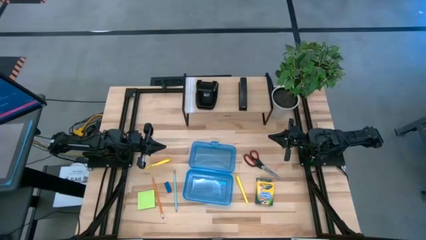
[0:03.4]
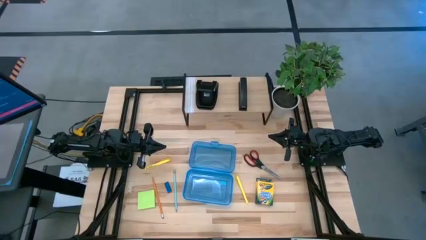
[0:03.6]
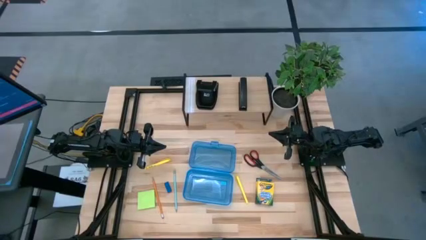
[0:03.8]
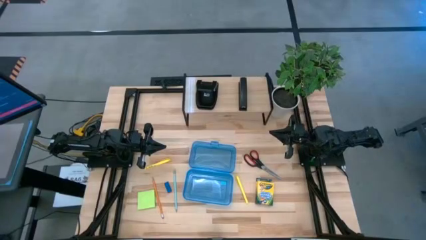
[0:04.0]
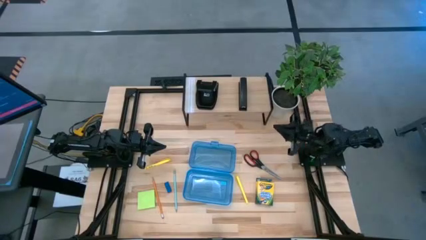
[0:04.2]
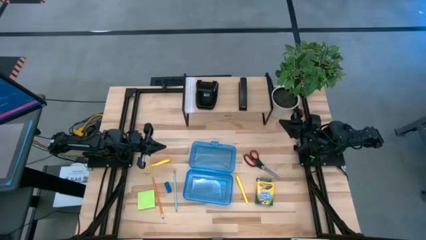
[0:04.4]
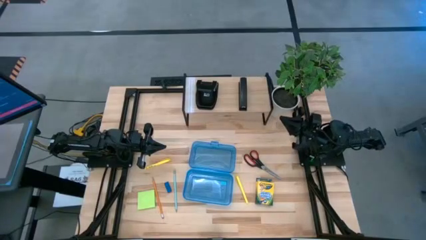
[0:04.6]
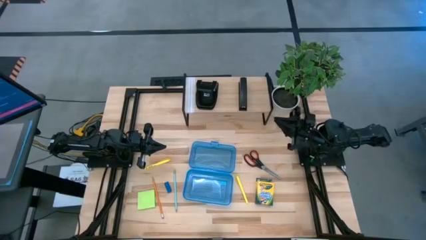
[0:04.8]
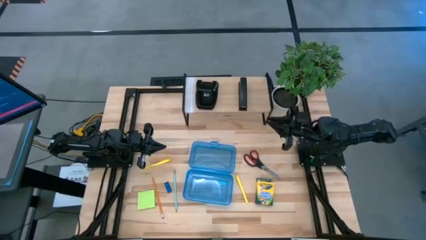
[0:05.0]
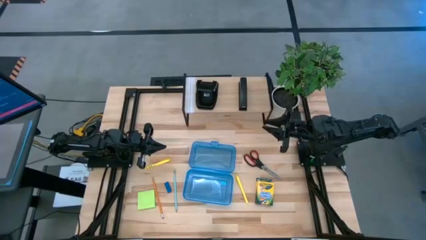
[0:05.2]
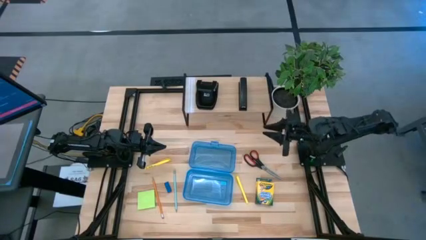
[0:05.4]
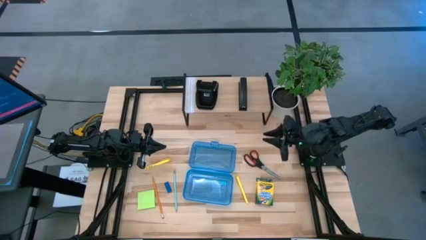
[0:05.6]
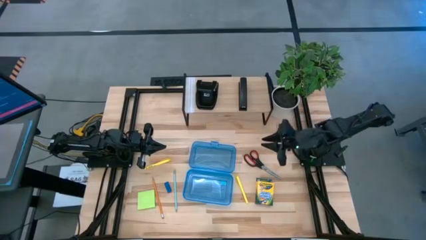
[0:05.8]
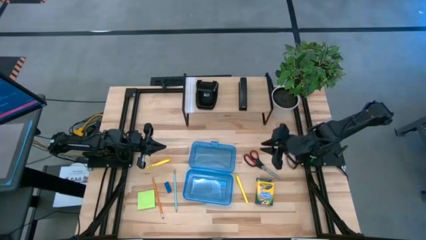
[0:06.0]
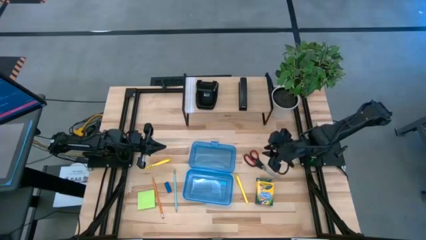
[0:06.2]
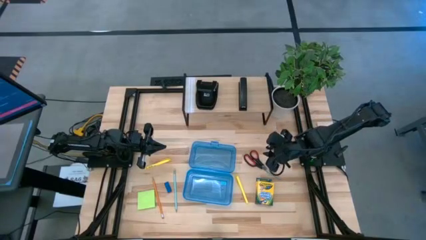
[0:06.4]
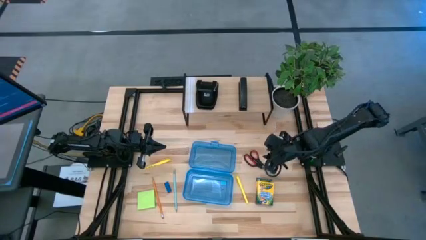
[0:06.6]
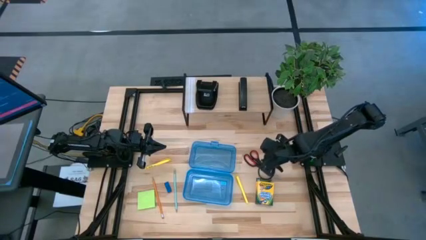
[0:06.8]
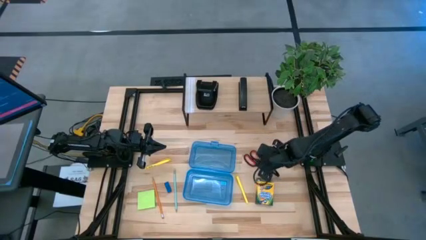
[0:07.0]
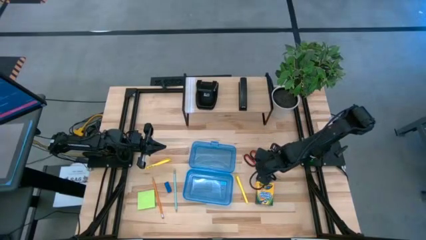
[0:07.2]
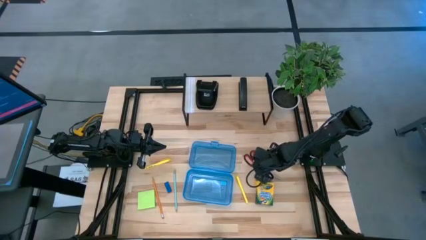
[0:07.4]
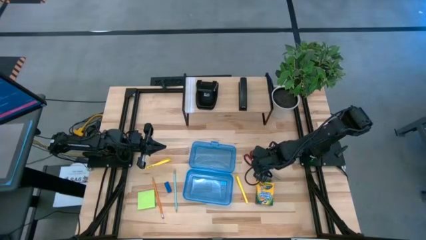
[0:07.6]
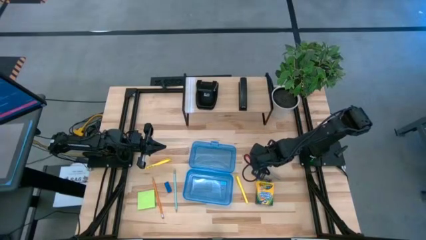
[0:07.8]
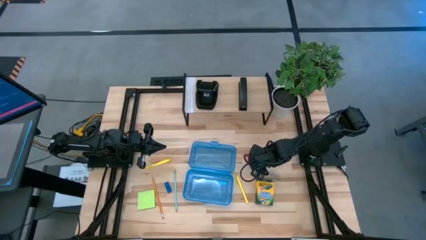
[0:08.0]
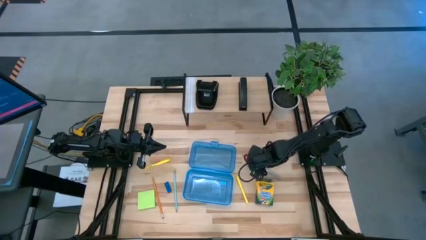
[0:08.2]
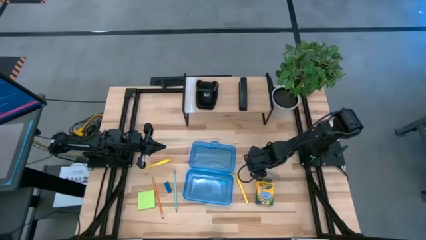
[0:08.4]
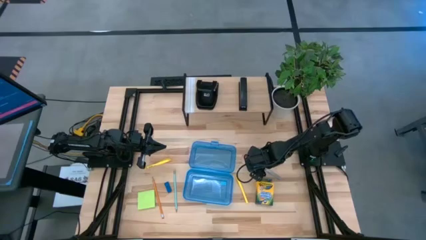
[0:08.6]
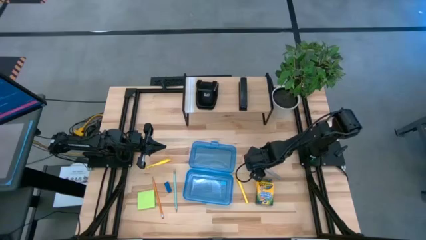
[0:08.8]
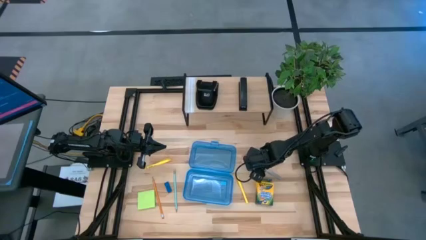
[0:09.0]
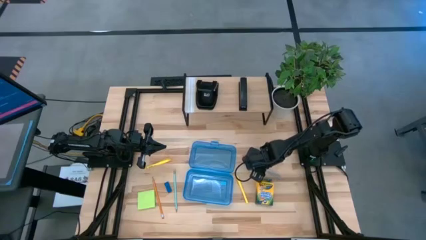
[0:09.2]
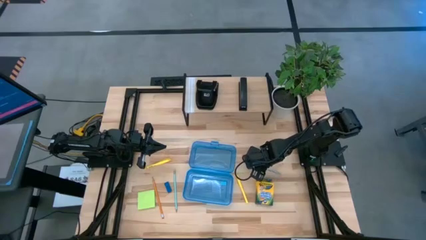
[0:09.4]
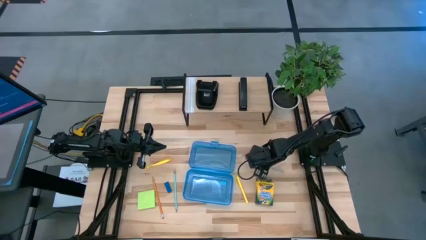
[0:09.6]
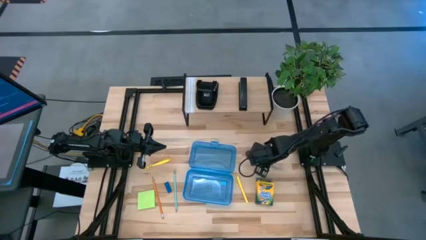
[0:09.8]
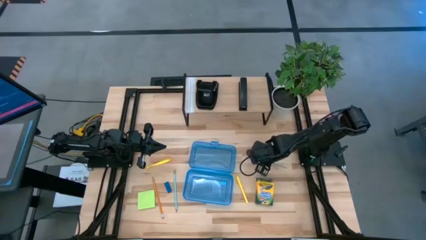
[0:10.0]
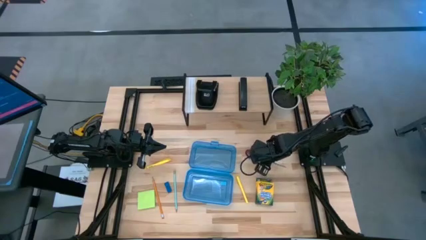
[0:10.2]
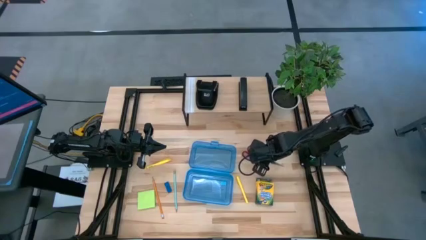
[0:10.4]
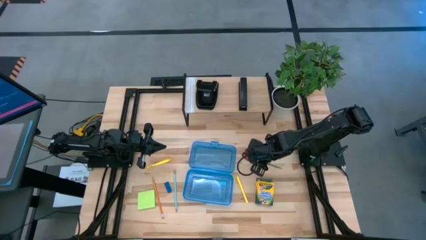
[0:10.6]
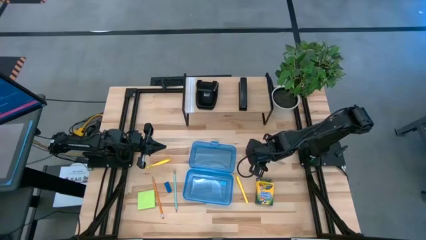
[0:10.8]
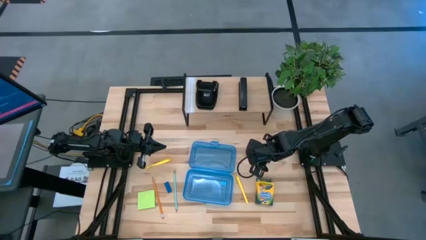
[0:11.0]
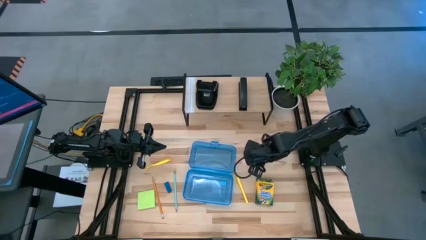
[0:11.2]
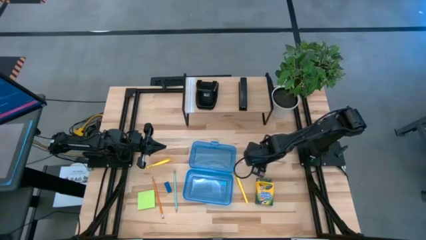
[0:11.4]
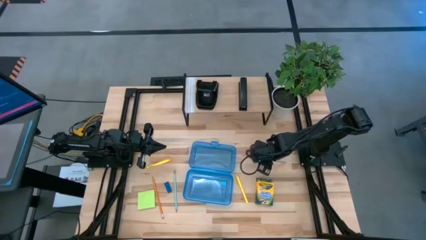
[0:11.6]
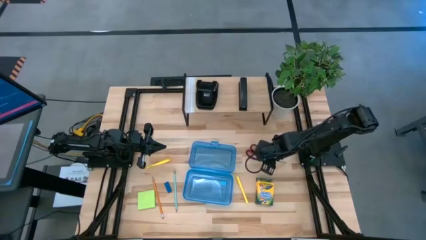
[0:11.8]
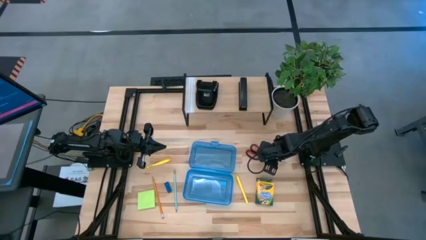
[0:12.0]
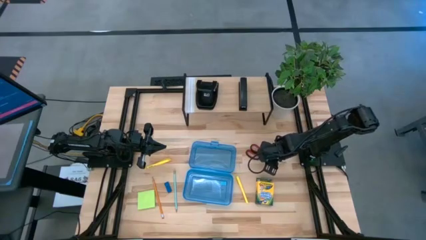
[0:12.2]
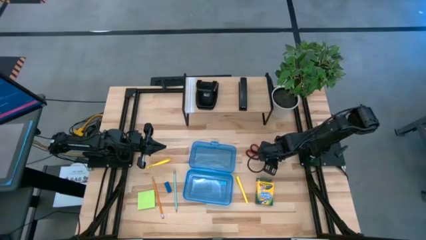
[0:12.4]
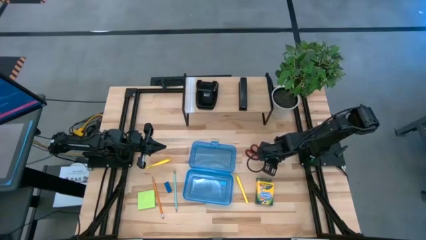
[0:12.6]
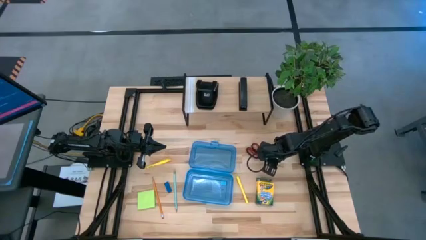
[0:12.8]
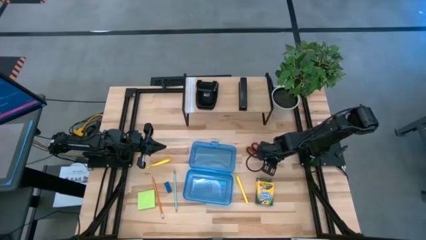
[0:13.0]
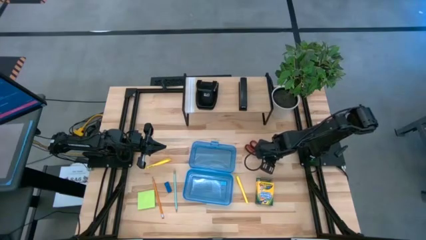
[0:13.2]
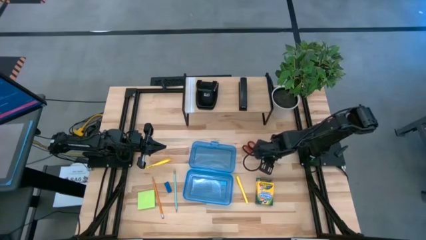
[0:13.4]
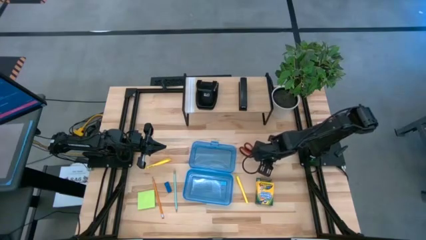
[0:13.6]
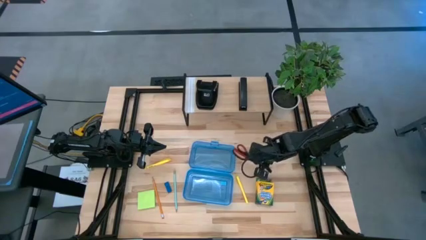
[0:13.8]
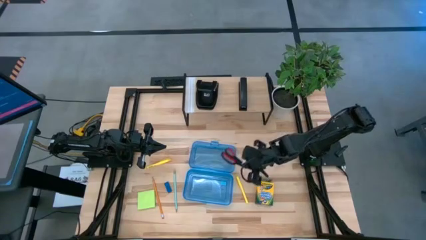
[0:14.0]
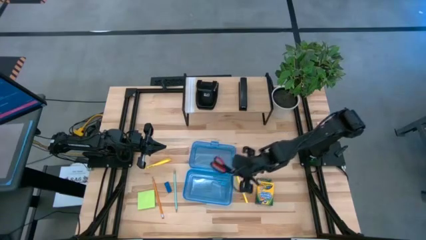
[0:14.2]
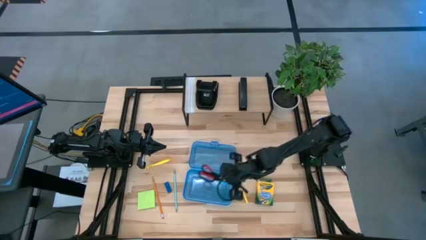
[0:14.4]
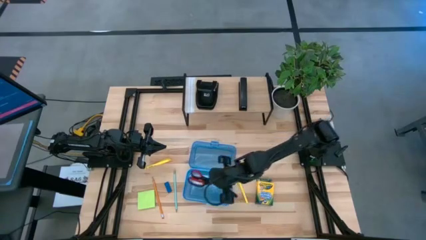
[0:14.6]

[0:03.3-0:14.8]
Task: Pack school essentials
Put the black scissors into the supply box

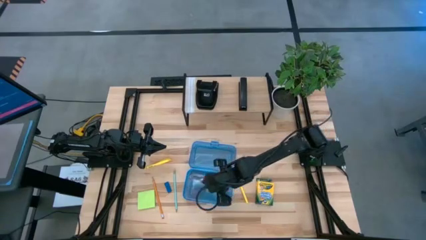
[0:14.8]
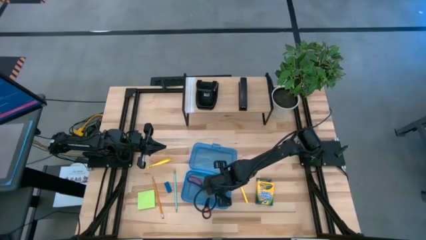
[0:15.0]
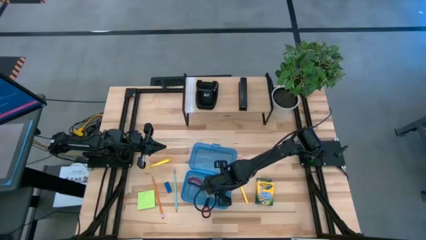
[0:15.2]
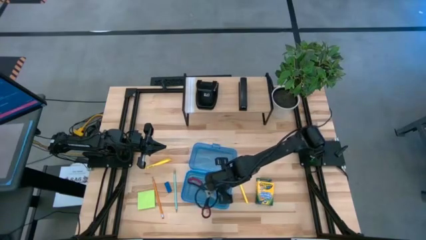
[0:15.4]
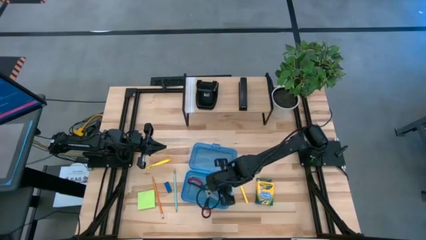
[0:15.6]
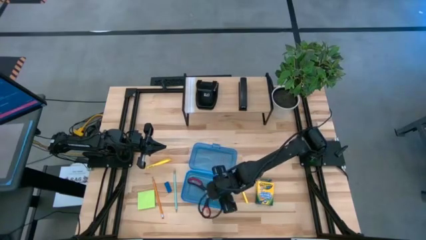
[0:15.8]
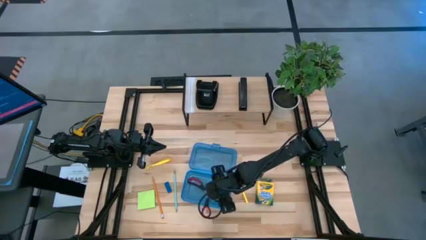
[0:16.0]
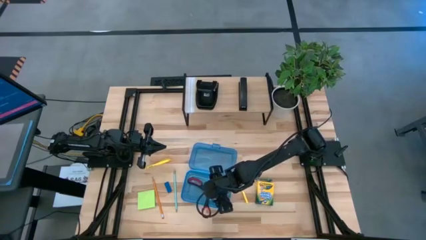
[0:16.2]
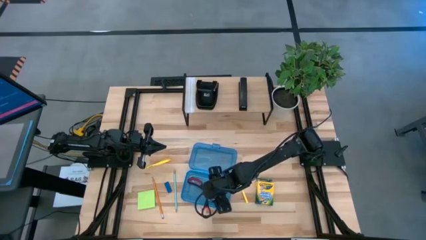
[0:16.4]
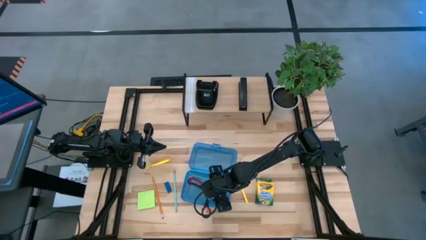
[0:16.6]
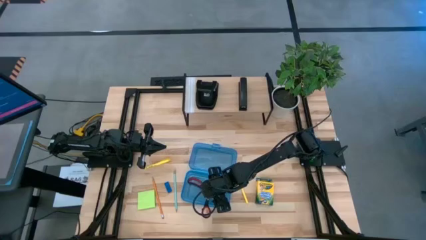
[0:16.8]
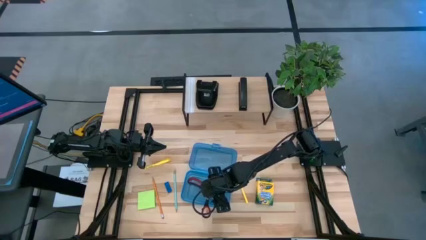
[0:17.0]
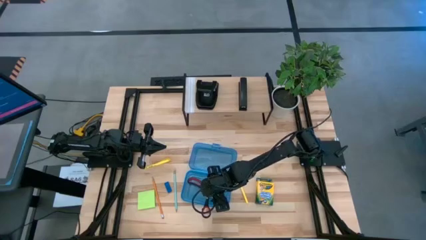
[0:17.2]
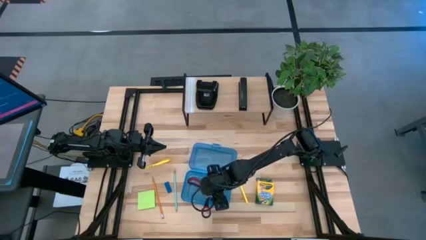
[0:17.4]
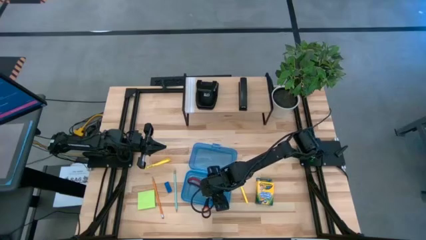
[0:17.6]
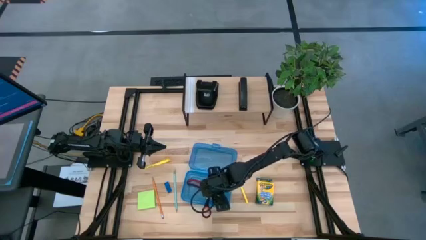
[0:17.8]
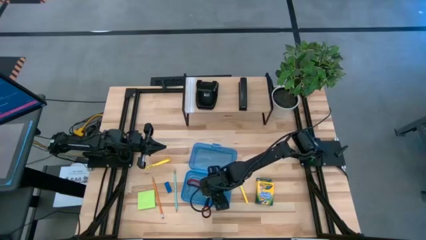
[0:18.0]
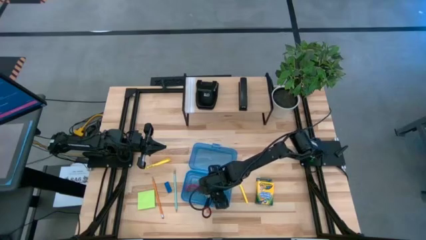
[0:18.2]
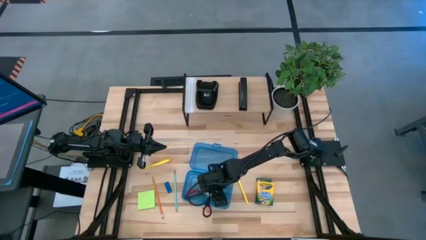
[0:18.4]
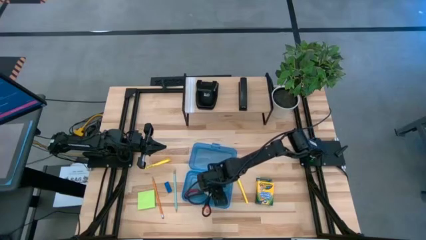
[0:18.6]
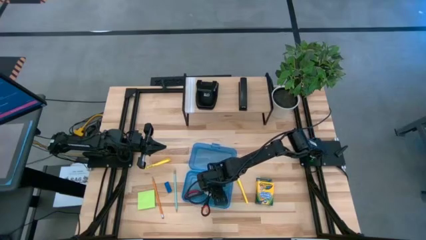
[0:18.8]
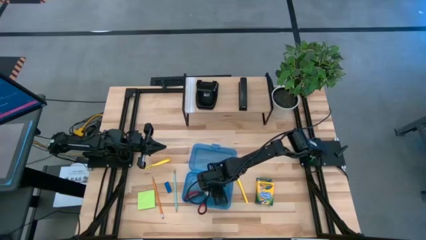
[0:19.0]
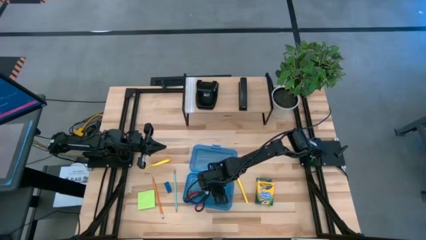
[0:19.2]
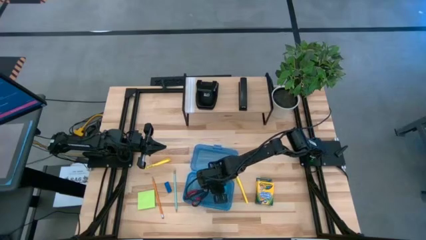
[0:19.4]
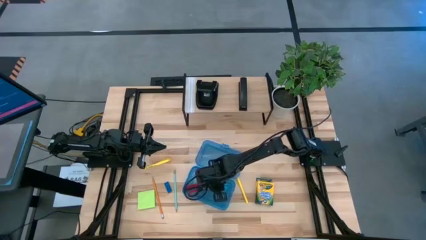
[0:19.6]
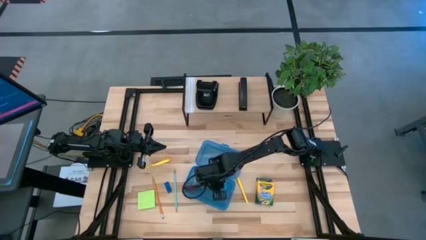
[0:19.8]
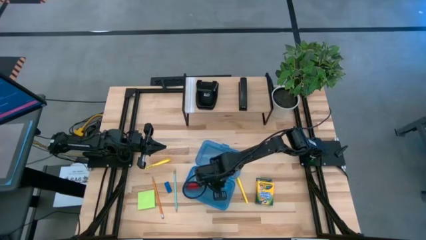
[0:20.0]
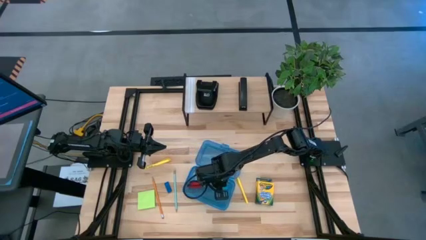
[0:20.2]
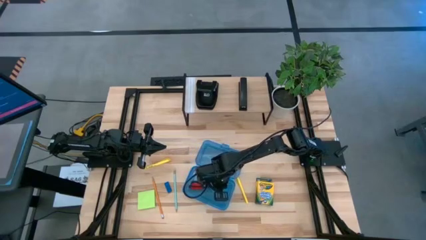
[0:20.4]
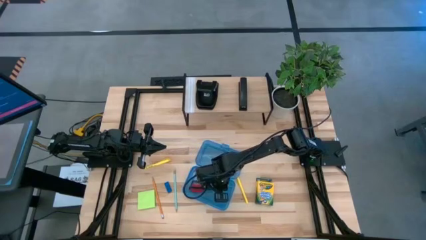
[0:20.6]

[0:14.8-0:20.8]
Put the scissors into the supply box
